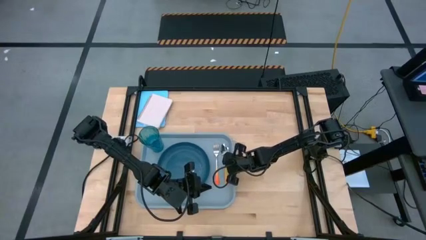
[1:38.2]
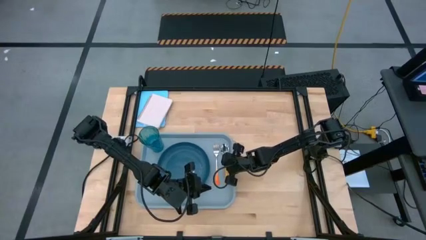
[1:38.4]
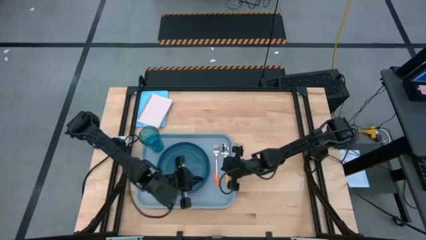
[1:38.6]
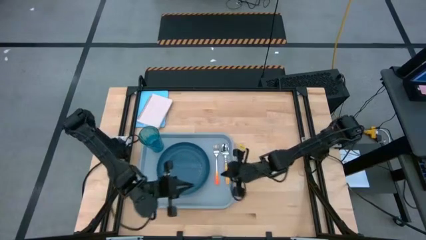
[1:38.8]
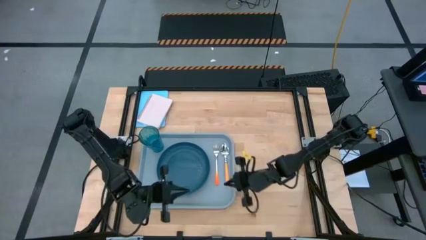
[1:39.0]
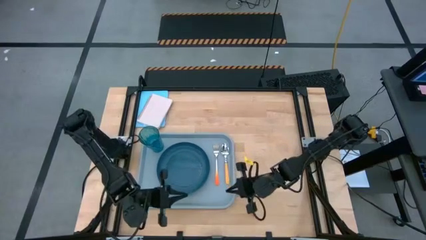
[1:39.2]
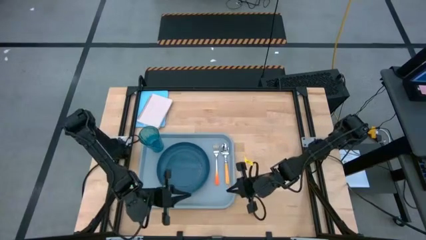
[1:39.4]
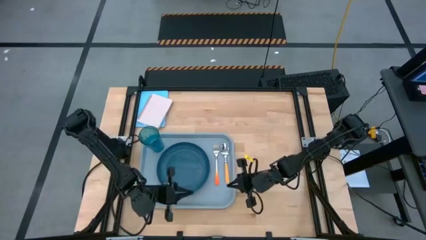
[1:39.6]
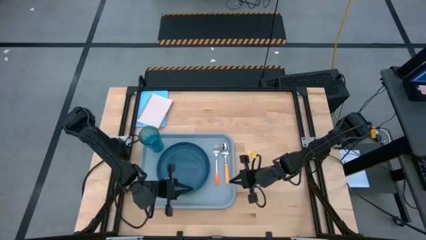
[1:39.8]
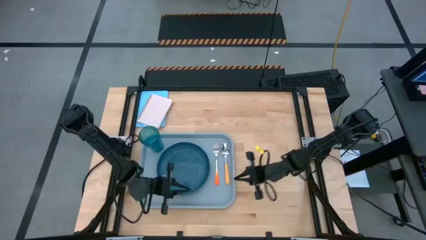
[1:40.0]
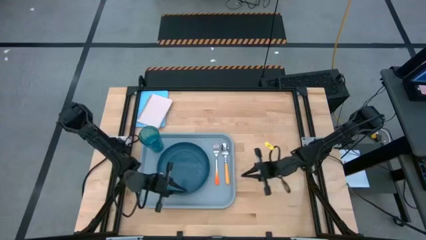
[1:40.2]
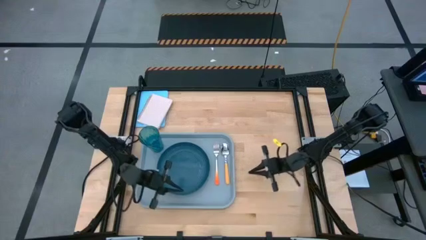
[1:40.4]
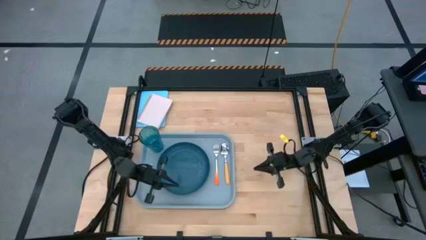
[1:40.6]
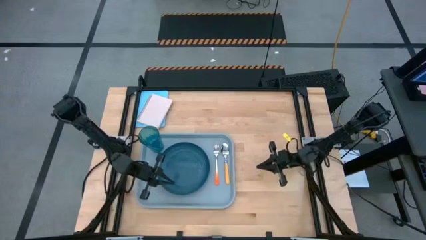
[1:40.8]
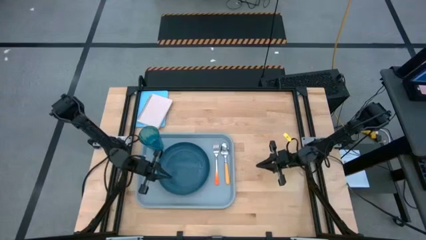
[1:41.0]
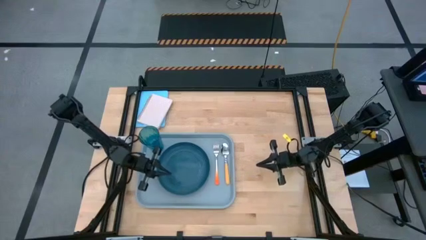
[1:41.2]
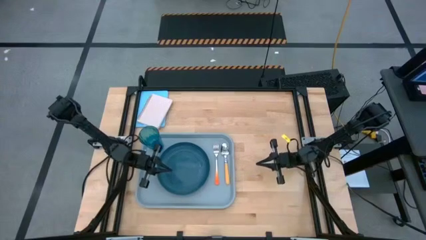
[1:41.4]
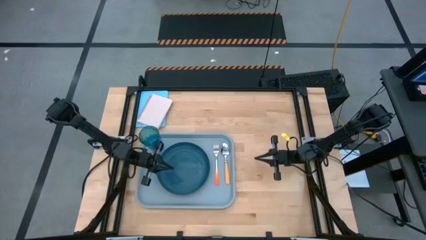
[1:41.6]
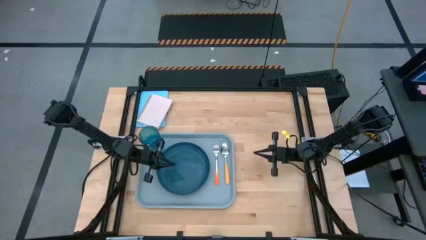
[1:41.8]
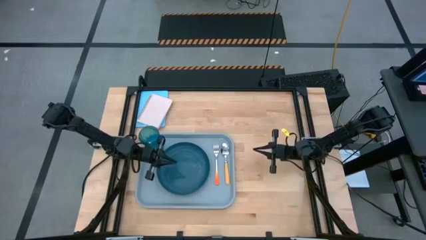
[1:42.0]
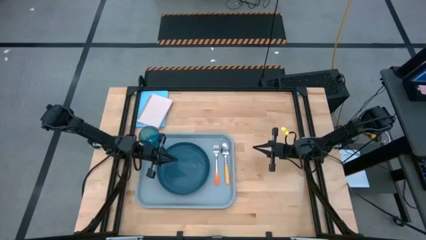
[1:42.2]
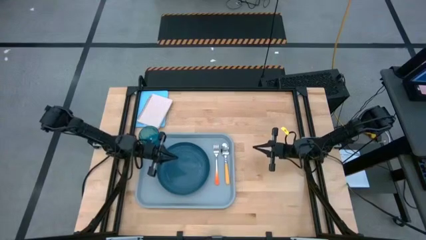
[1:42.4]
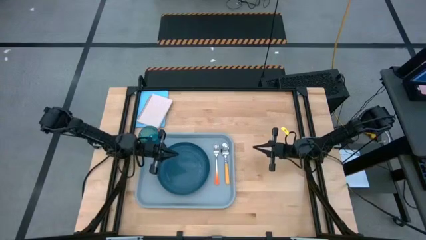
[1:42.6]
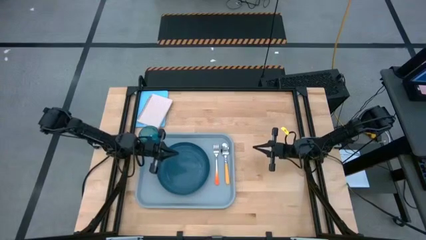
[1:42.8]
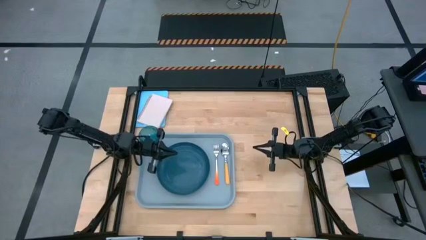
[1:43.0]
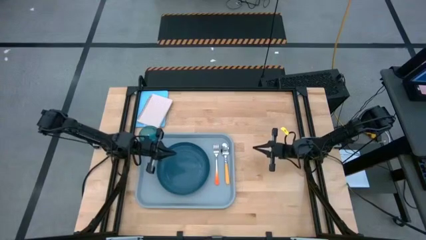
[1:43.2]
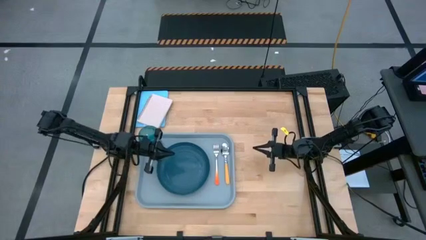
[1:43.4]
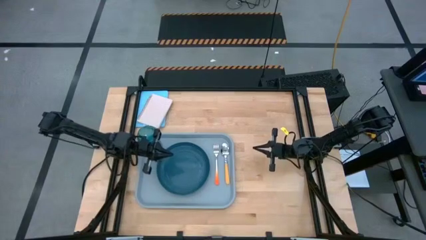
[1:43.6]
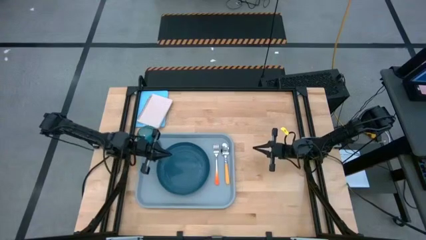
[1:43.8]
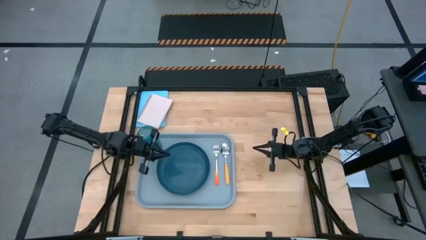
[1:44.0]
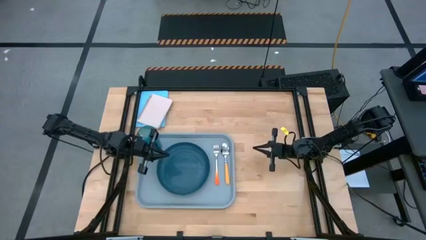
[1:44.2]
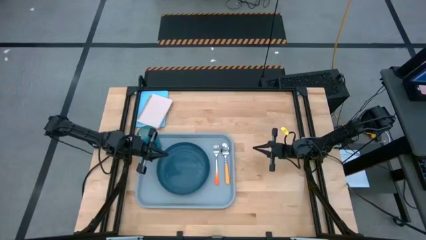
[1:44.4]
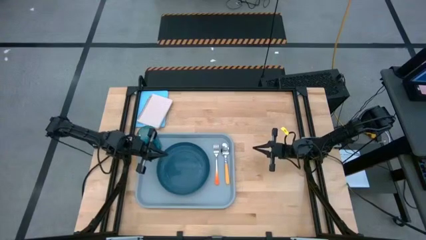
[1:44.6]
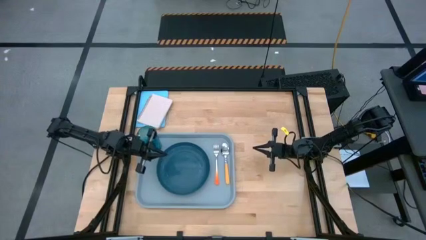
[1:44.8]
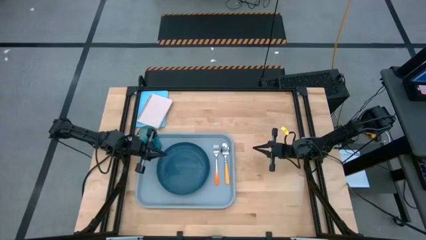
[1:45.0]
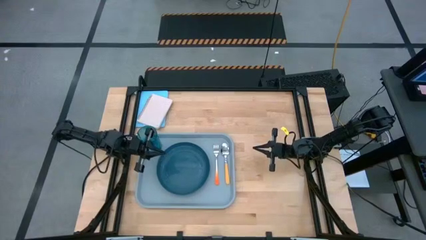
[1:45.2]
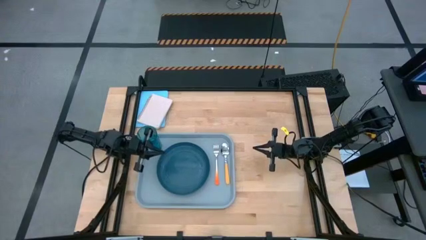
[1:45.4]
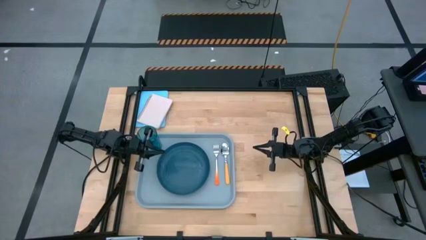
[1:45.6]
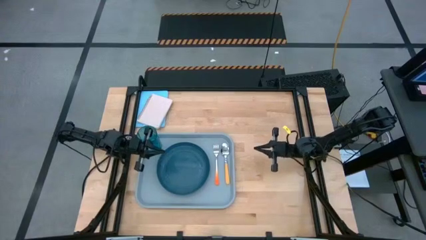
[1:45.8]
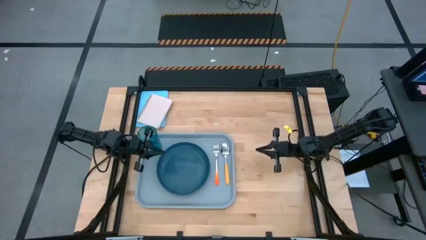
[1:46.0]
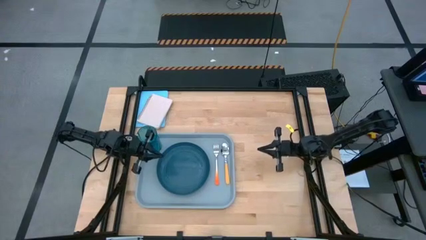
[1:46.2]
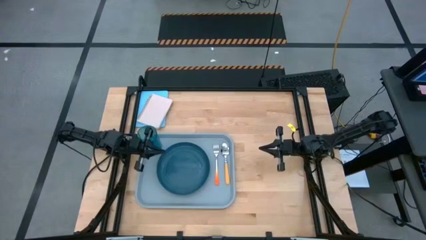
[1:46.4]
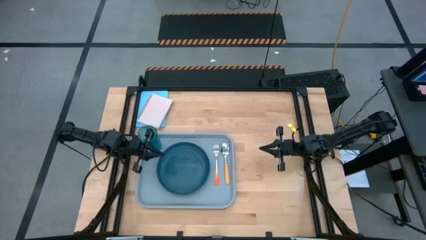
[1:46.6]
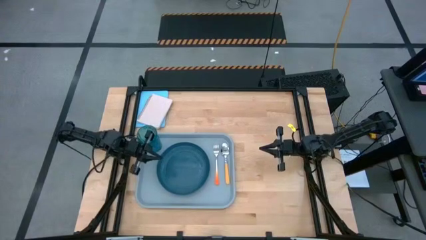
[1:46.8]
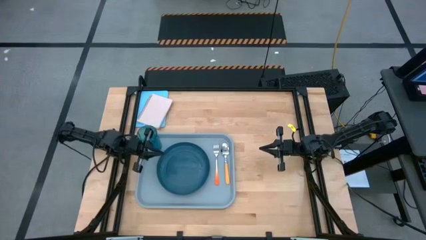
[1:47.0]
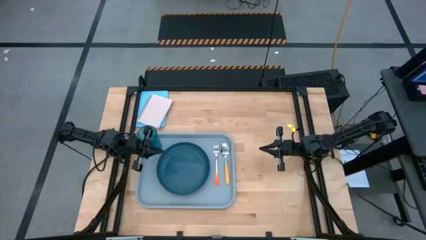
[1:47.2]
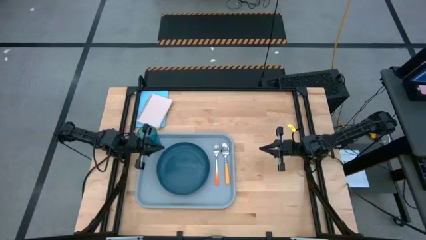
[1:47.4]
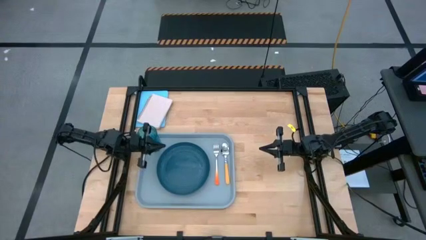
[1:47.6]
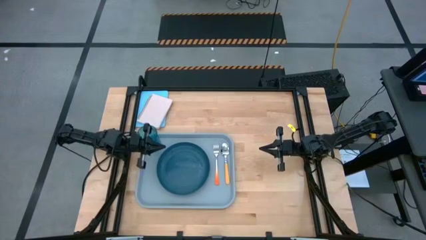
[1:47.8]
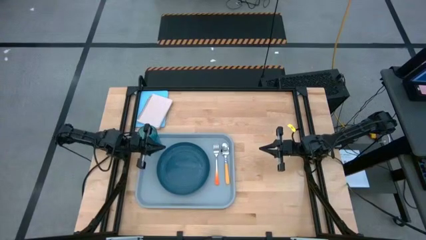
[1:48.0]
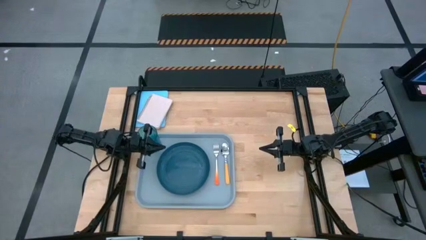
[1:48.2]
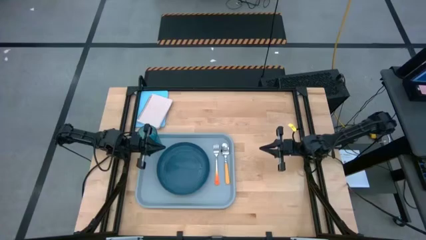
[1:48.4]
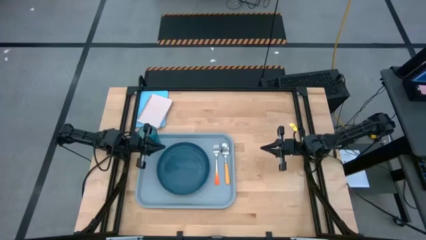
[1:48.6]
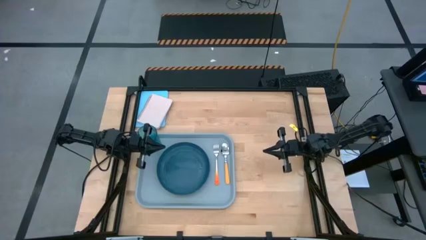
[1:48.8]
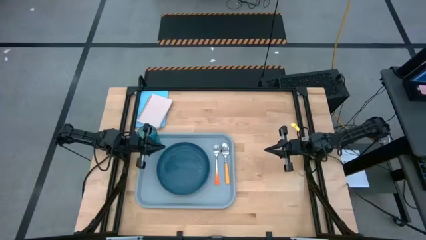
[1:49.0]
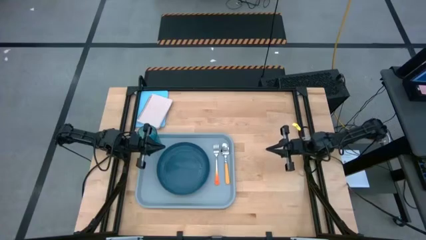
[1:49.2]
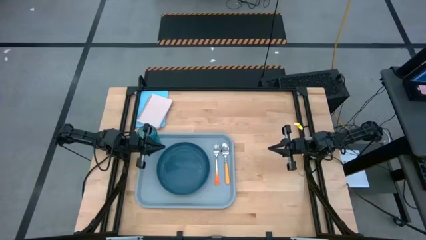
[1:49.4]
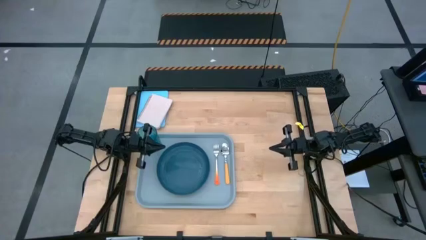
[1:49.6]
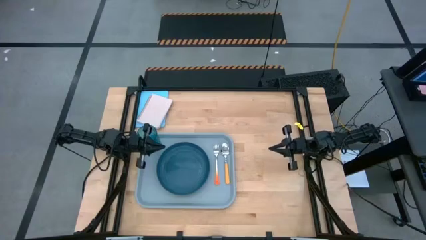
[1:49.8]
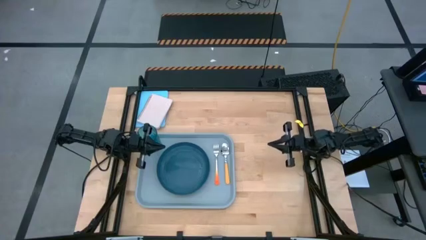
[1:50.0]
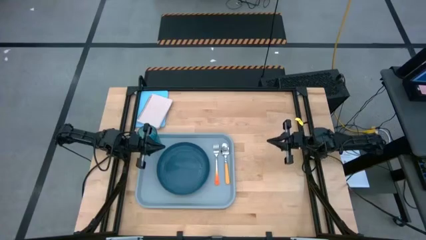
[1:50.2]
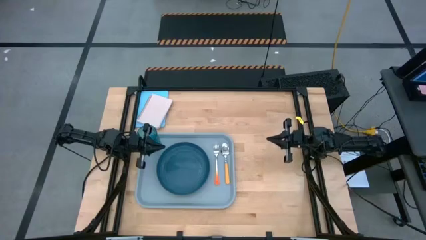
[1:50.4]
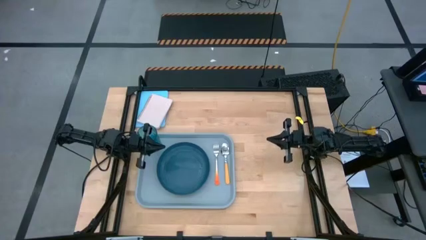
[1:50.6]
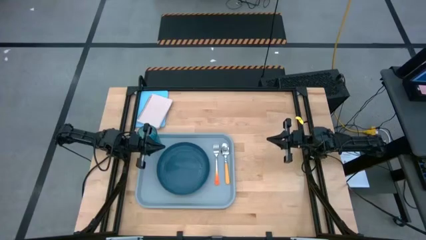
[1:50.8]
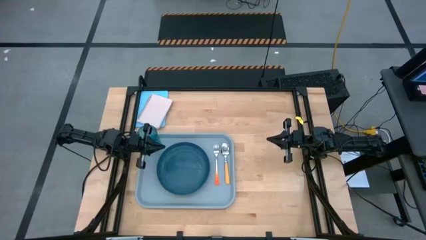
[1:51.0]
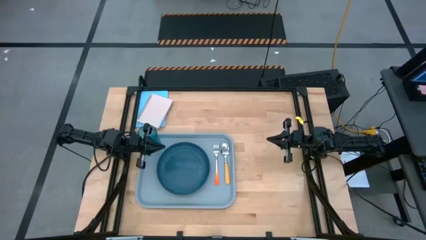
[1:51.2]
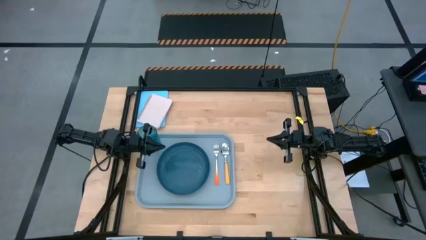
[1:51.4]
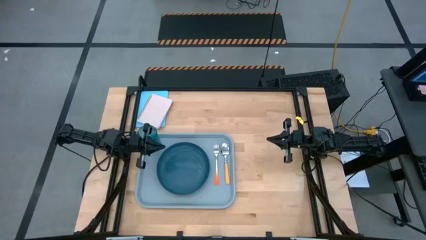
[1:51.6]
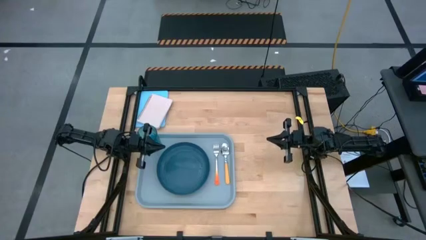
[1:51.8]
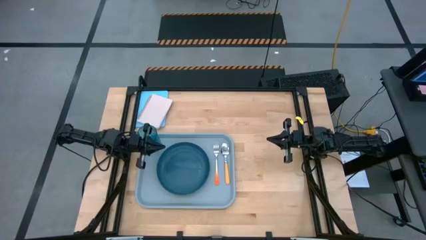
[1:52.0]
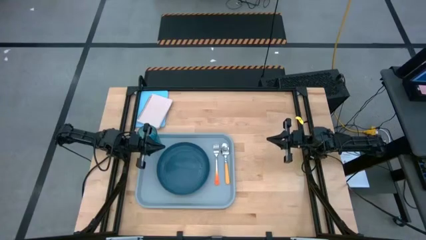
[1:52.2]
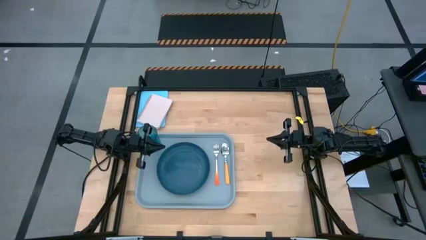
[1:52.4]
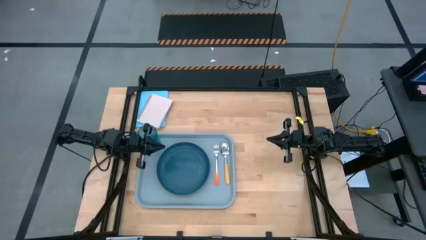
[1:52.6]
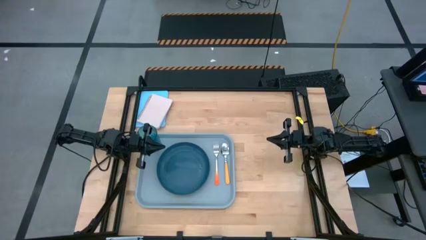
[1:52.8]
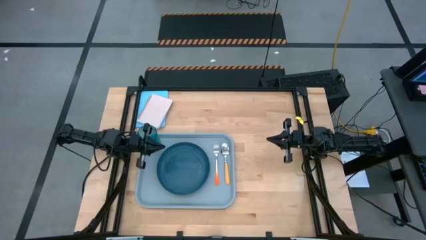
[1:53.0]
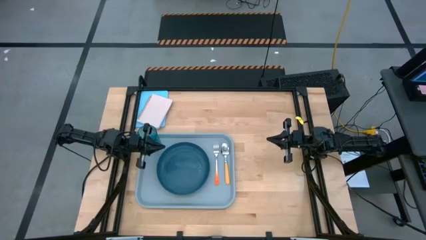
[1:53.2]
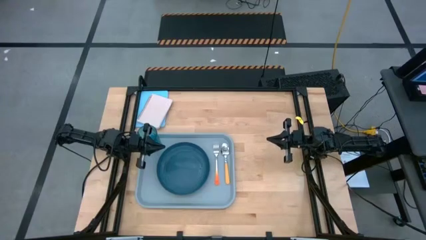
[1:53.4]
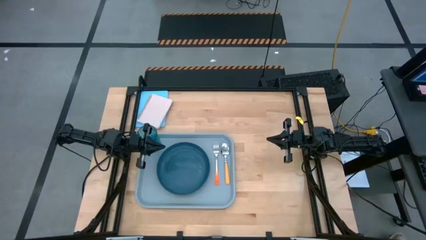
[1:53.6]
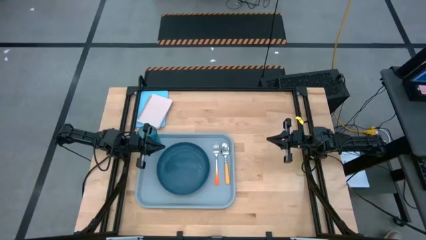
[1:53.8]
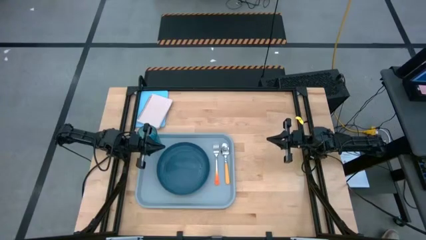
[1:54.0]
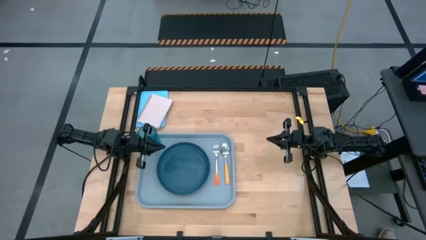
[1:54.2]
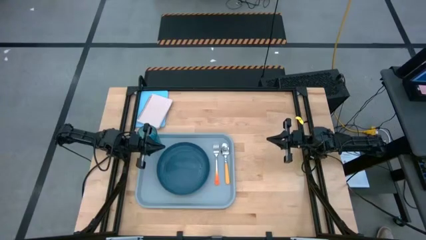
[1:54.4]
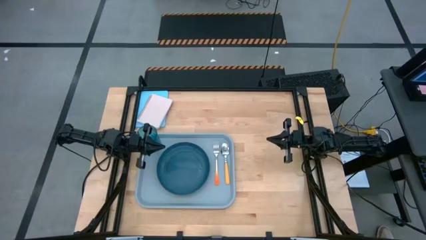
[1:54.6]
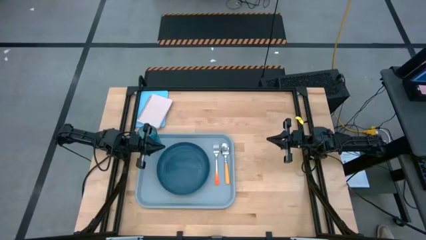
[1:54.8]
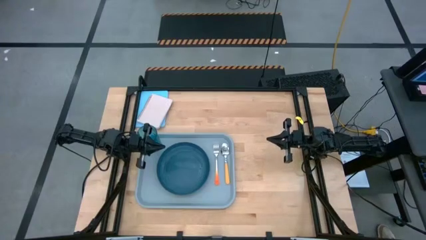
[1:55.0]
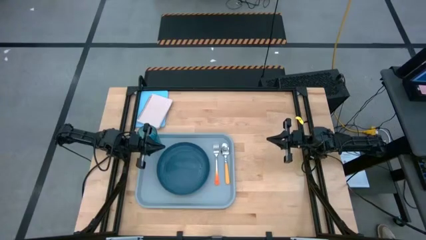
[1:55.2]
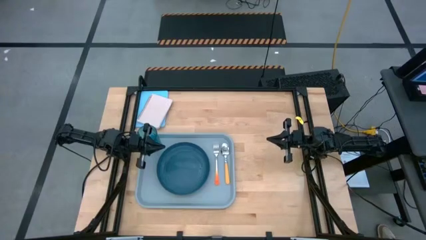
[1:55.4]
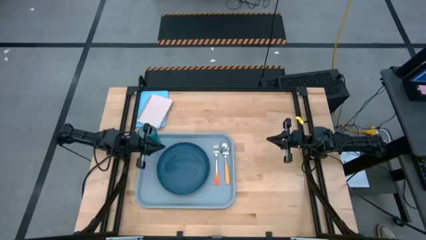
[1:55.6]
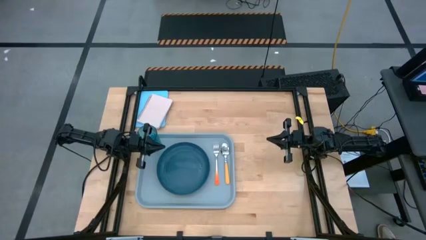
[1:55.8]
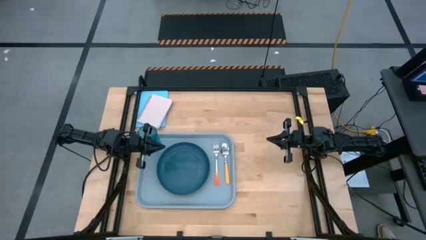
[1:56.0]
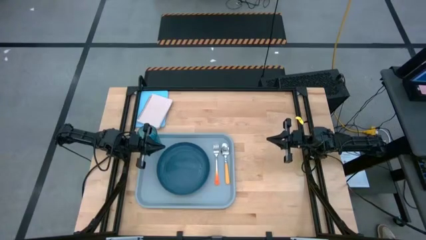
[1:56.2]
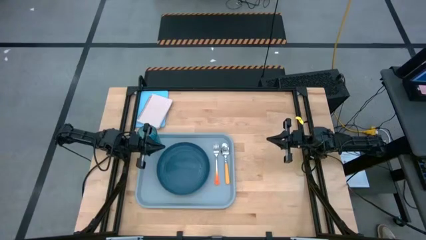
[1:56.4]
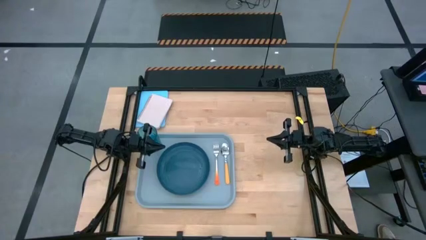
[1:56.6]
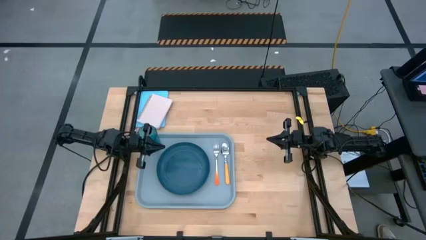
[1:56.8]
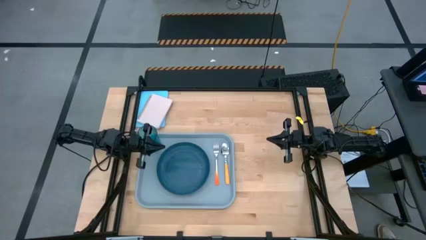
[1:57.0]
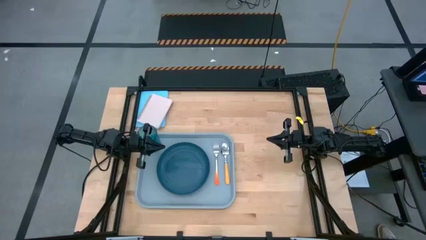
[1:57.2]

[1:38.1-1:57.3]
Task: Pick and place plate/cup/fork/spoon on tray
Return to Home Position
